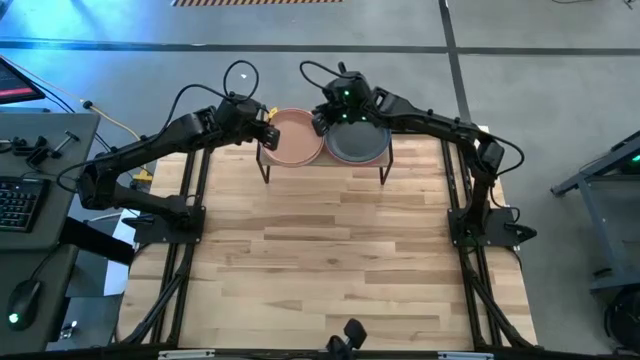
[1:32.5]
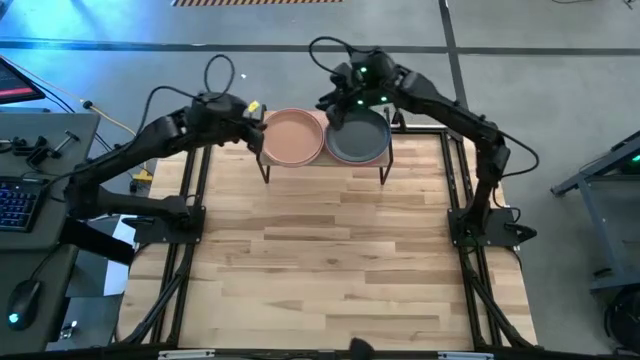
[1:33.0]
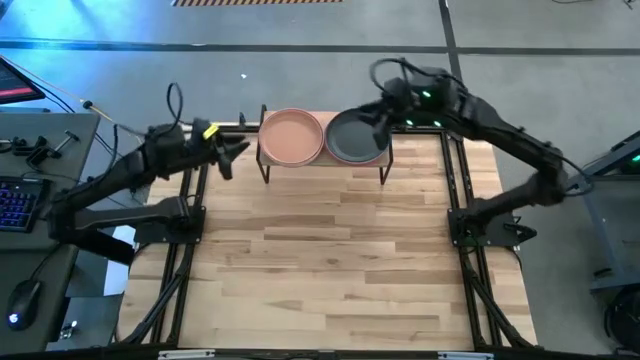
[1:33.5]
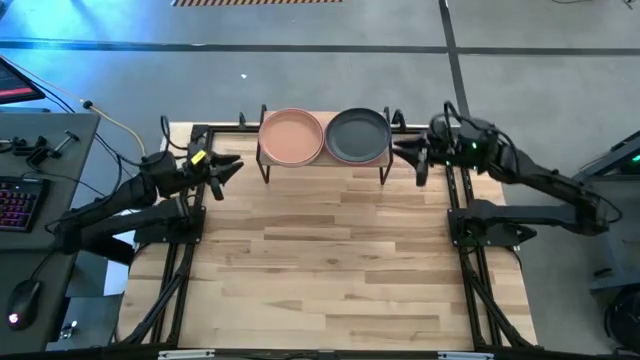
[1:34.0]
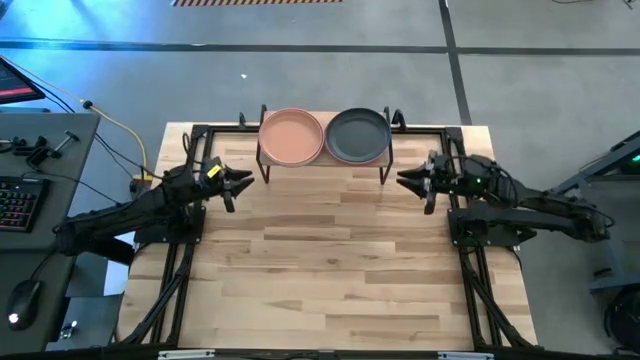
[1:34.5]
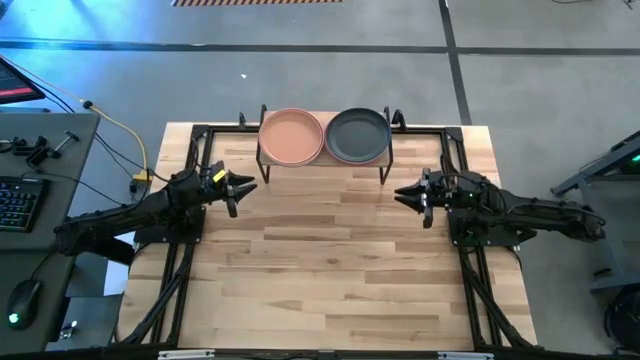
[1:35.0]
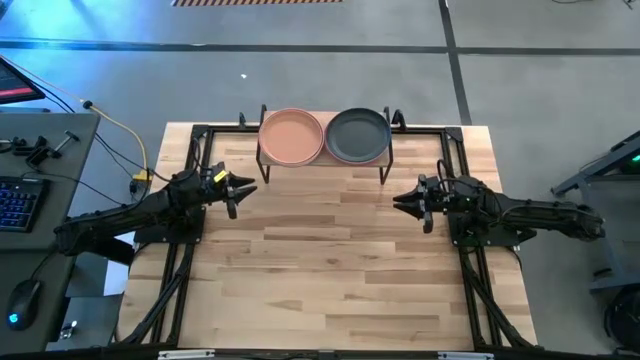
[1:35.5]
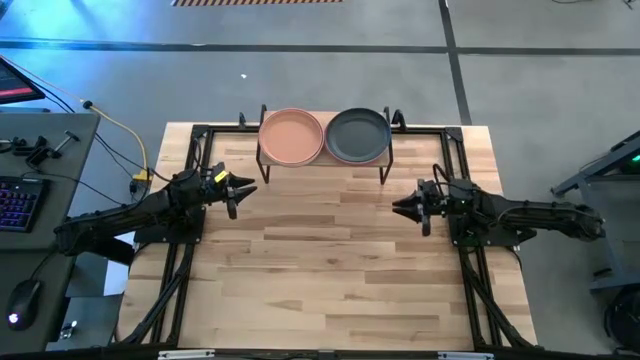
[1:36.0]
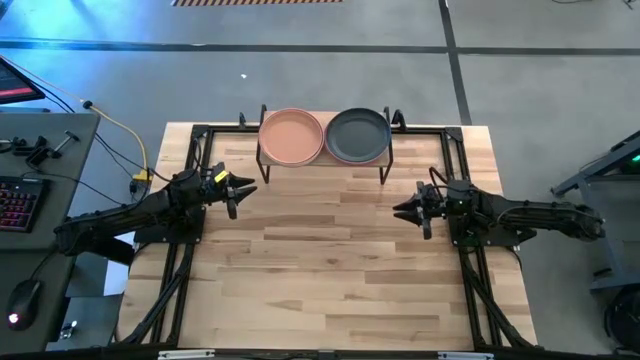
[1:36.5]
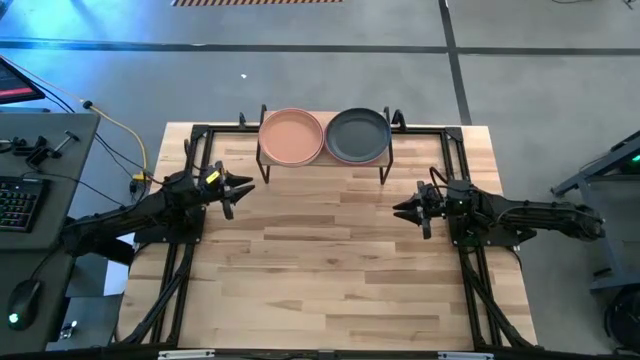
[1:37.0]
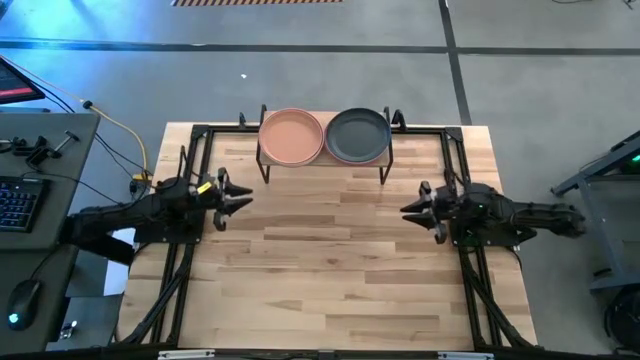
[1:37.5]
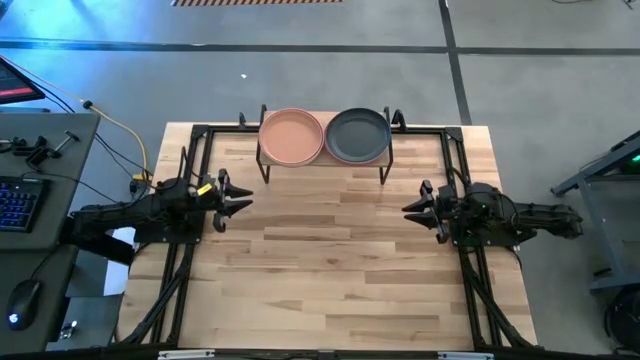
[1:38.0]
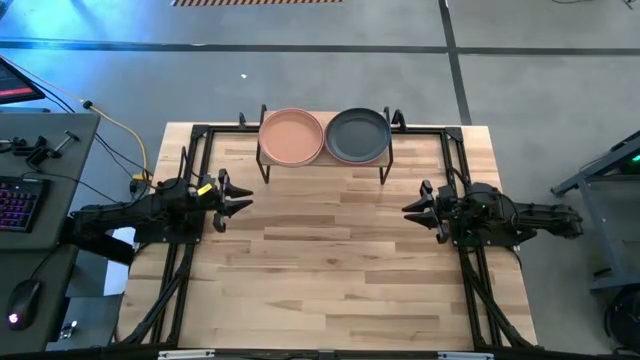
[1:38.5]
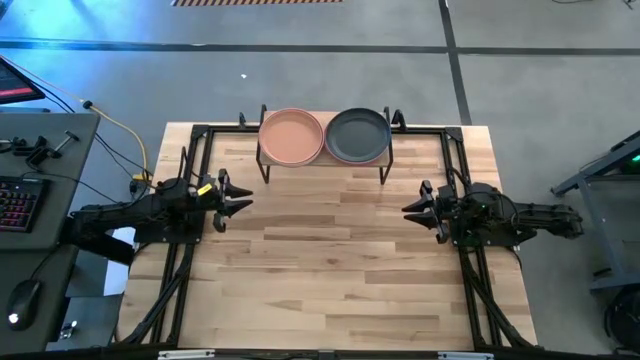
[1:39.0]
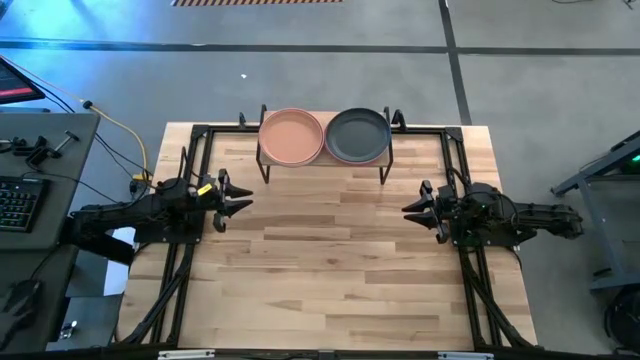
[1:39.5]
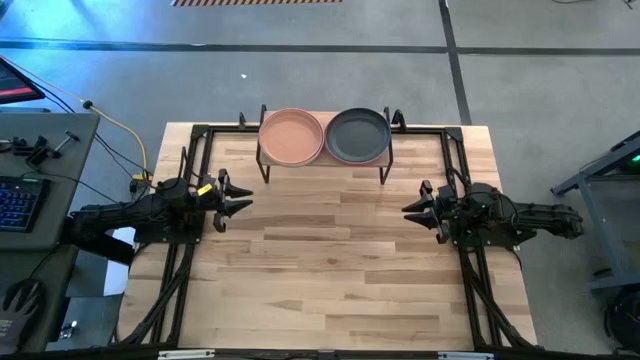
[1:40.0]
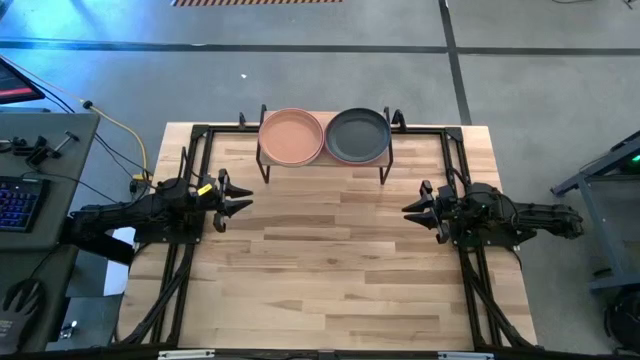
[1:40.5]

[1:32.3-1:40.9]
Task: Place and stack plates onto a shelf
Return to Home Position

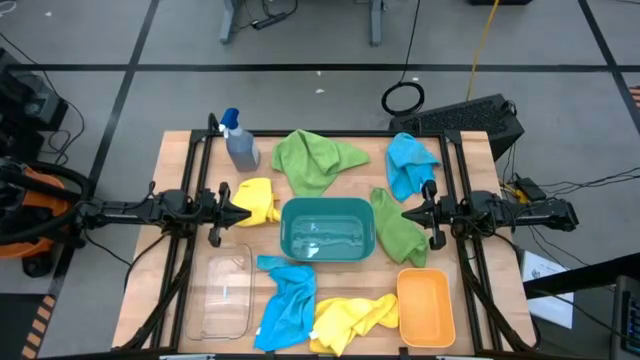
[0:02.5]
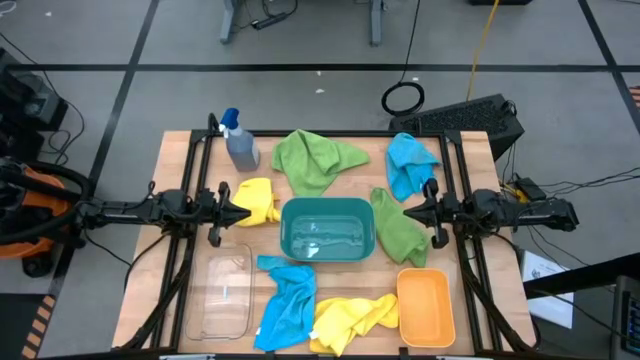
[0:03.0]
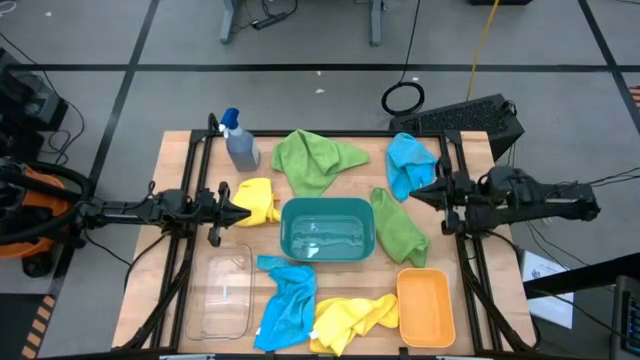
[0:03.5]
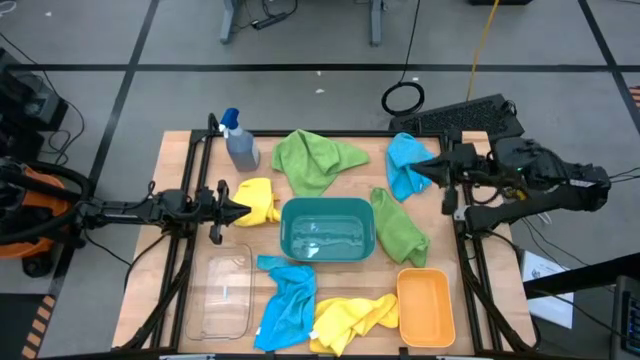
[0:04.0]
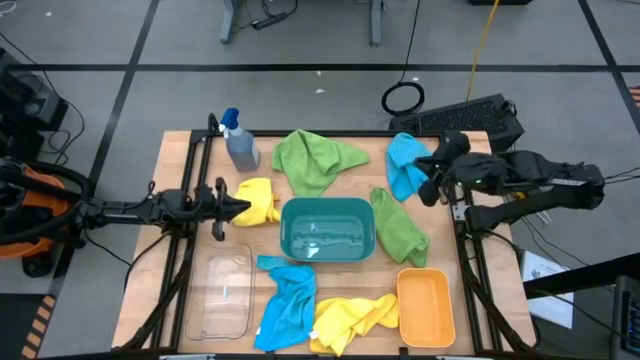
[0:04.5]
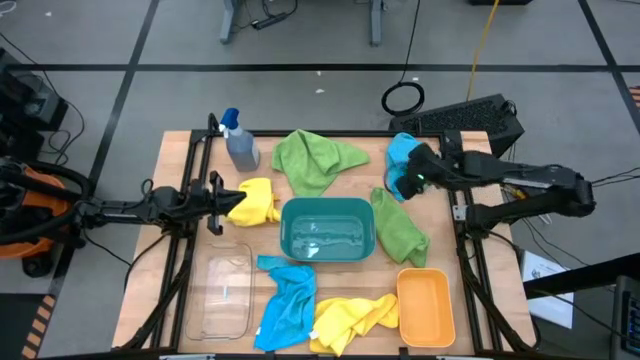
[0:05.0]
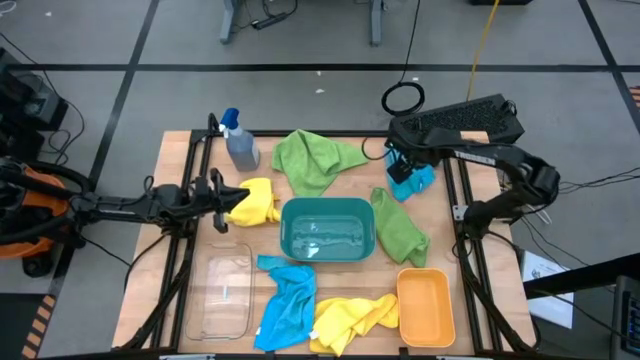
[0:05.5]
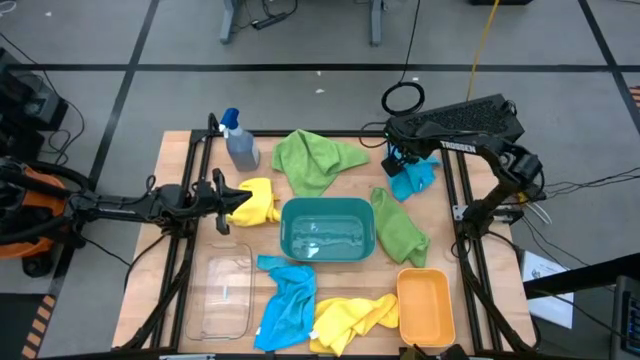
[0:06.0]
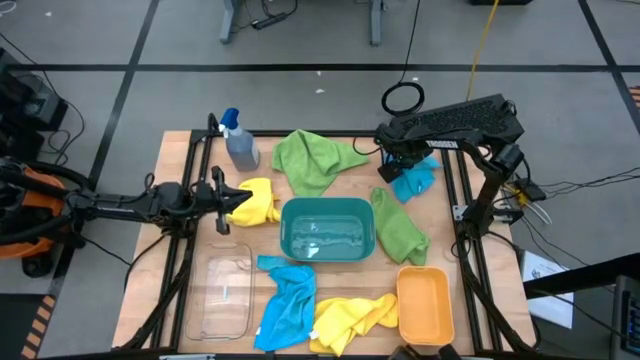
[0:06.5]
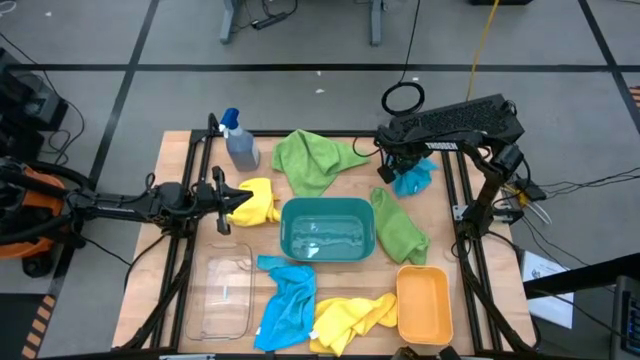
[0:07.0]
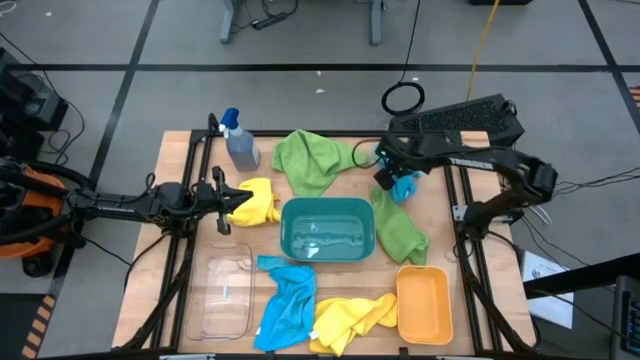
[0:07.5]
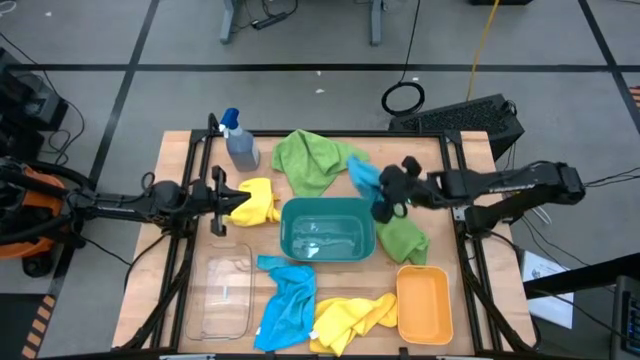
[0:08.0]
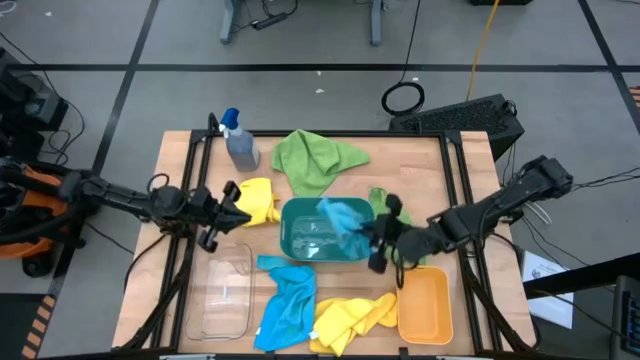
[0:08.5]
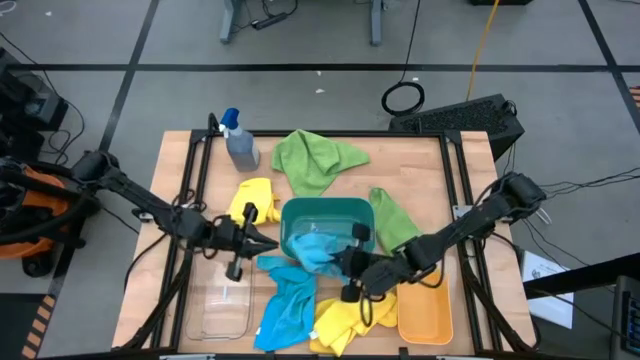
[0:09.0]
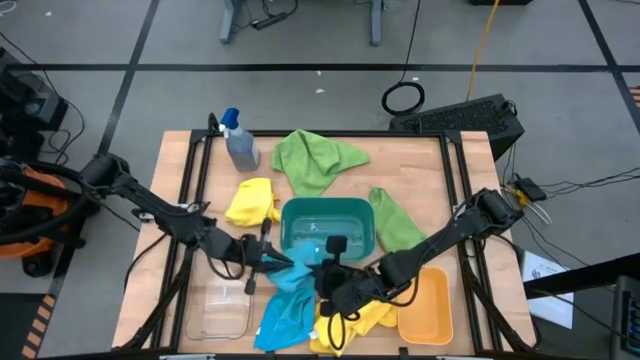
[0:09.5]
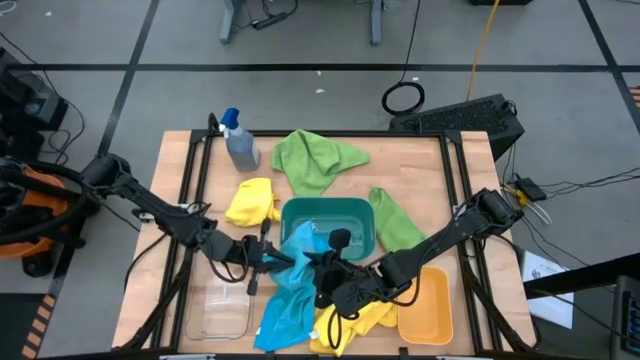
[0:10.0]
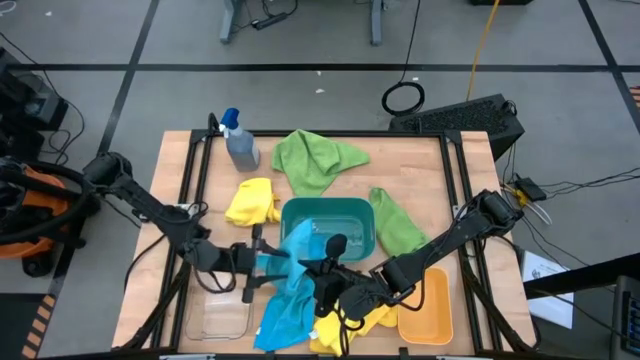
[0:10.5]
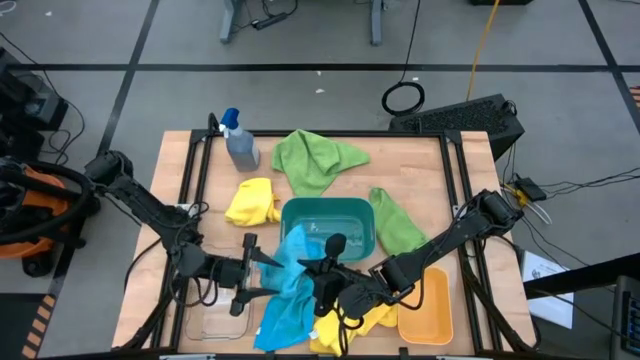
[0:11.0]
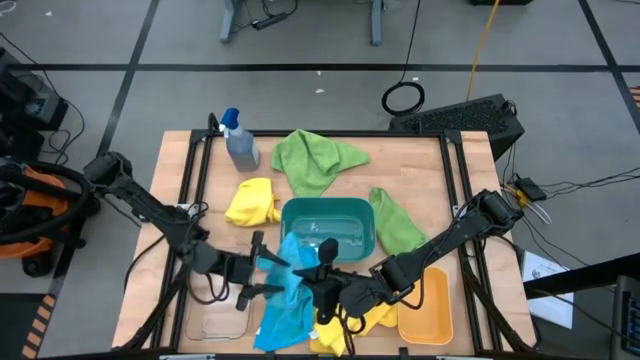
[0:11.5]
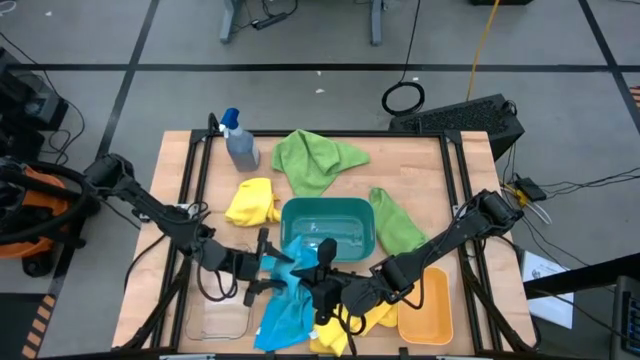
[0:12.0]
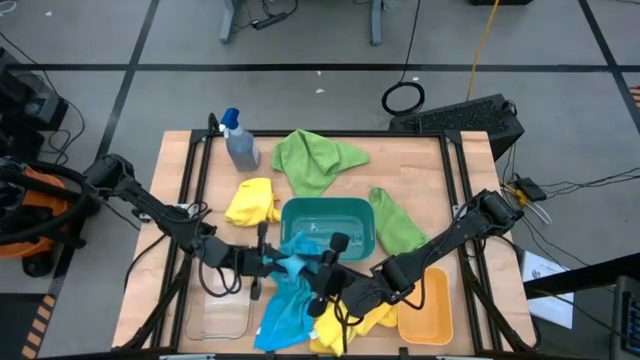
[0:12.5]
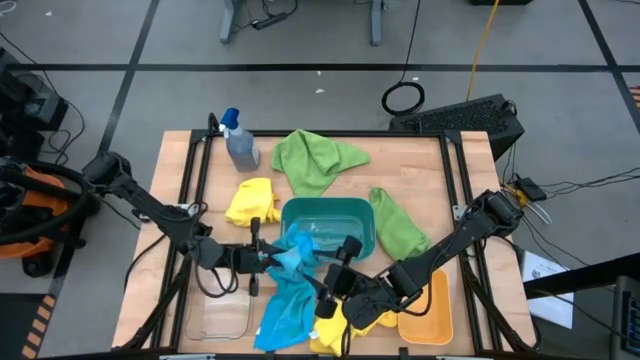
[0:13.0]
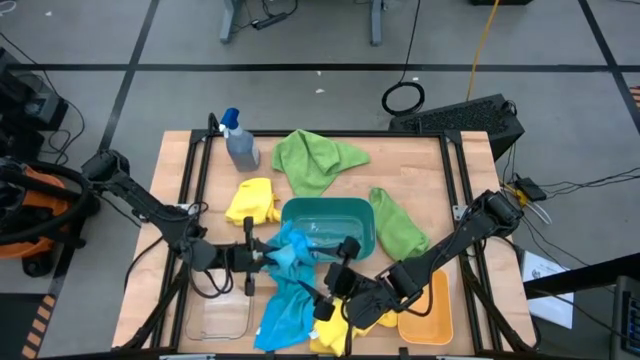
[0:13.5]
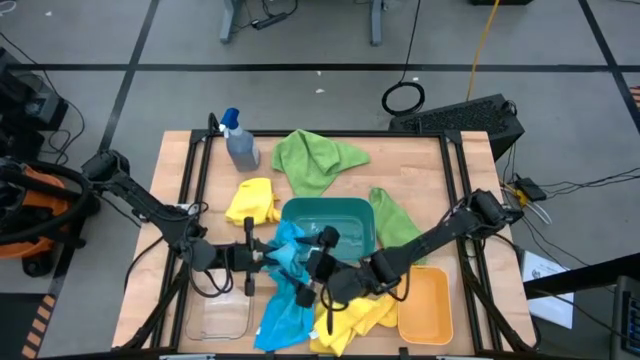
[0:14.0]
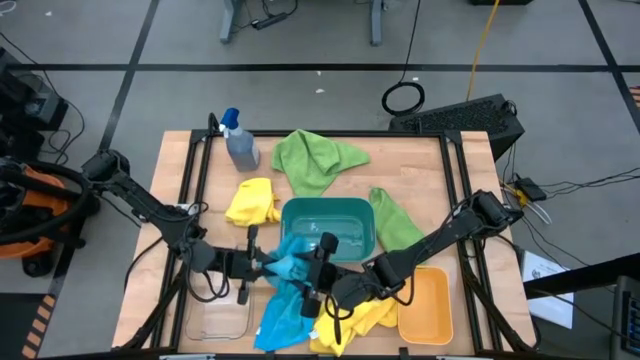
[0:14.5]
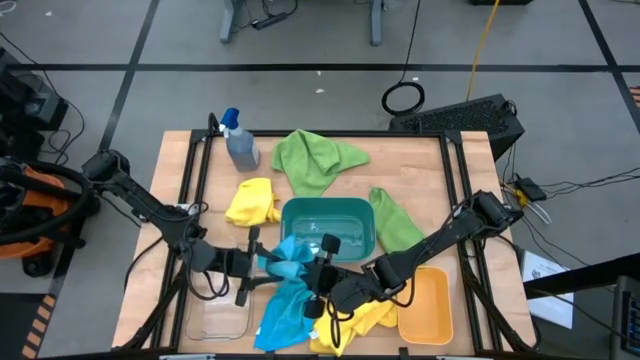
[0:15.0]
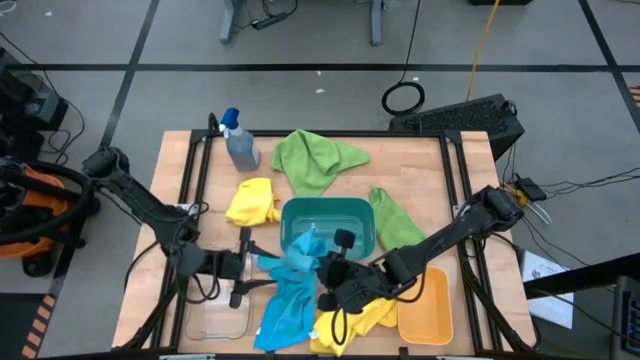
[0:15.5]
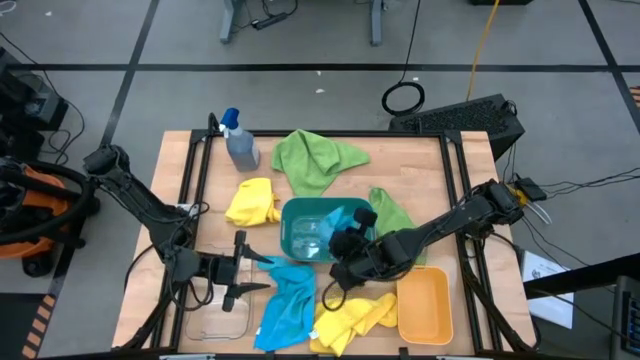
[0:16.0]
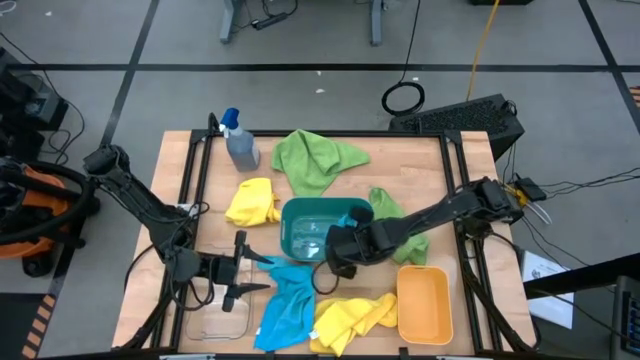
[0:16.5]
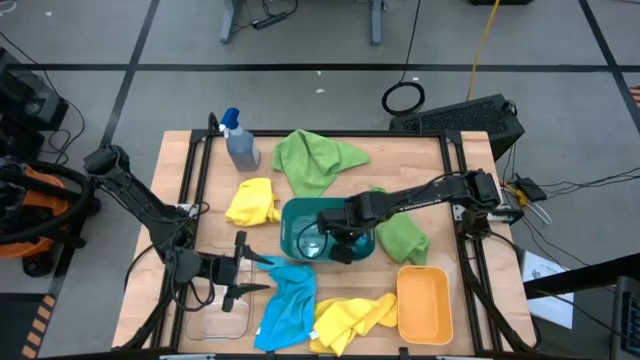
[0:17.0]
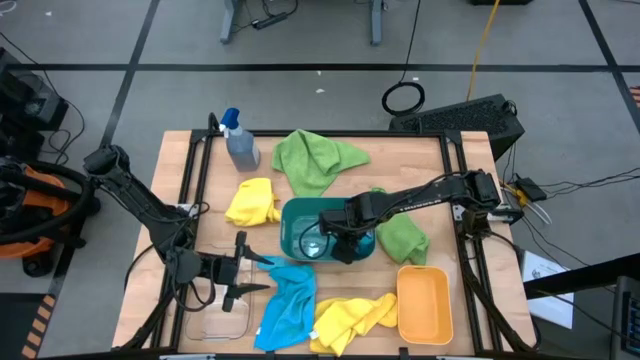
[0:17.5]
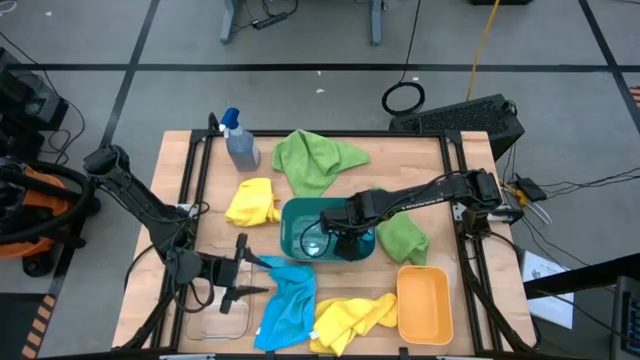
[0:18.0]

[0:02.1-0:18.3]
Task: Sort microfiber towel by color & place in baskets
Put the top blue microfiber towel into the blue bin
